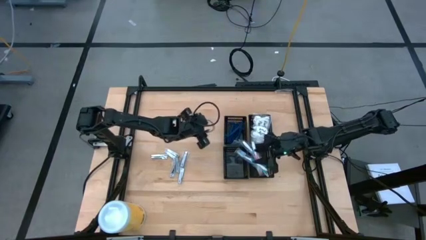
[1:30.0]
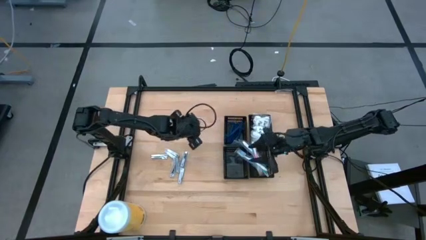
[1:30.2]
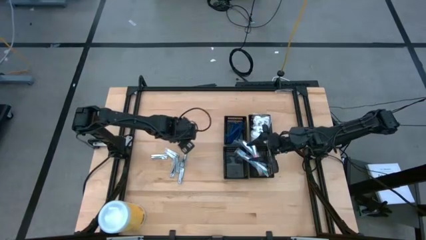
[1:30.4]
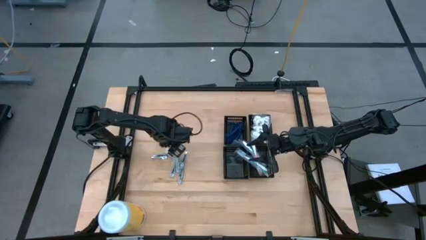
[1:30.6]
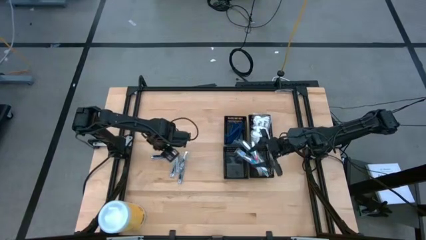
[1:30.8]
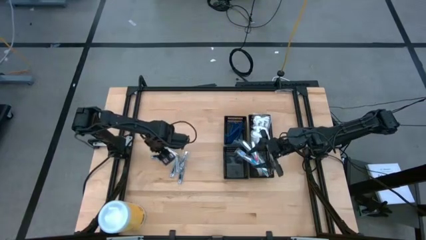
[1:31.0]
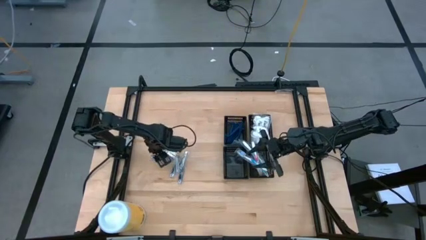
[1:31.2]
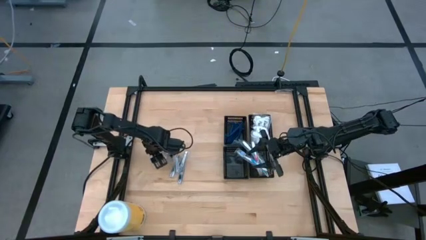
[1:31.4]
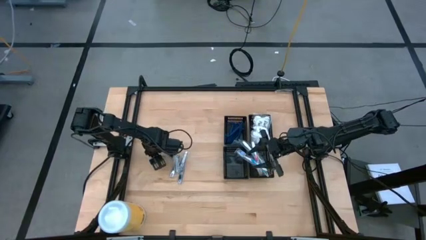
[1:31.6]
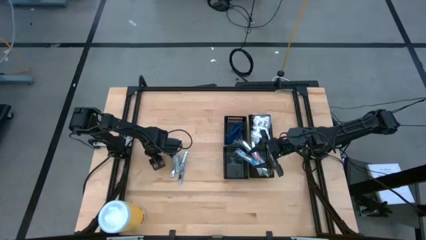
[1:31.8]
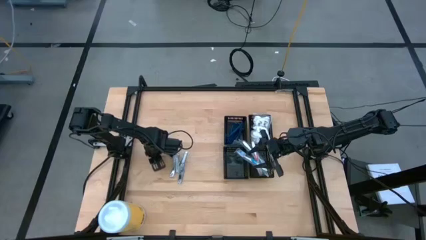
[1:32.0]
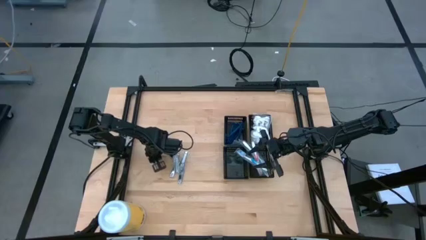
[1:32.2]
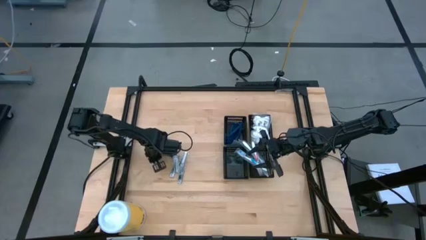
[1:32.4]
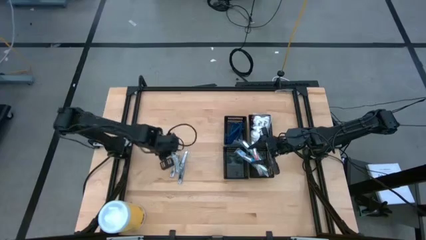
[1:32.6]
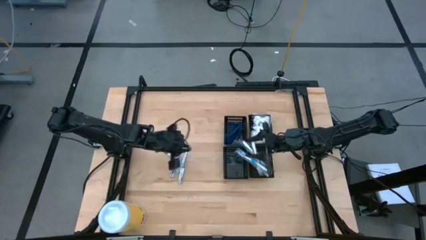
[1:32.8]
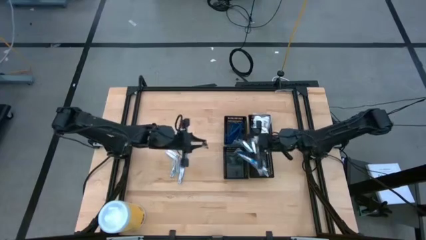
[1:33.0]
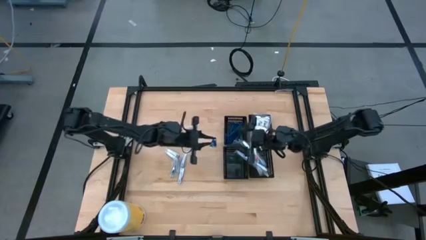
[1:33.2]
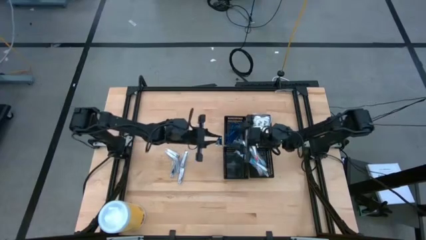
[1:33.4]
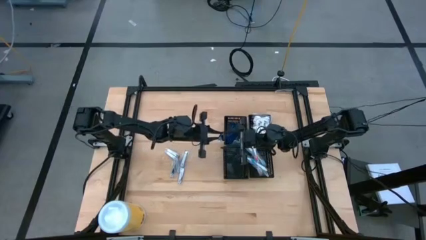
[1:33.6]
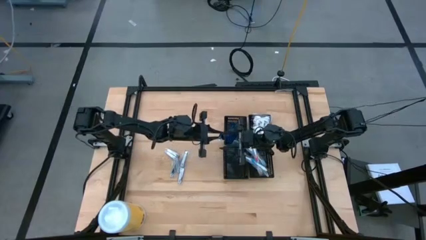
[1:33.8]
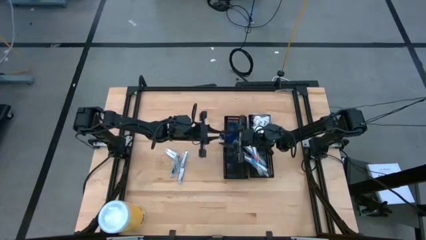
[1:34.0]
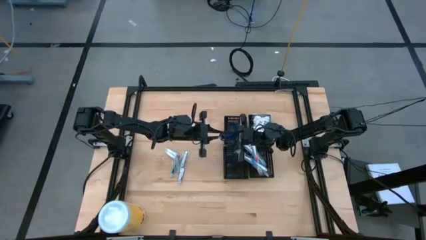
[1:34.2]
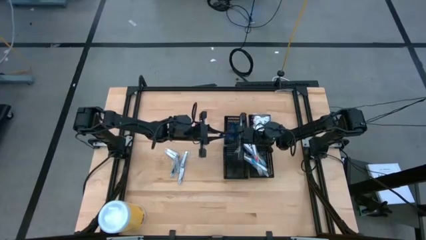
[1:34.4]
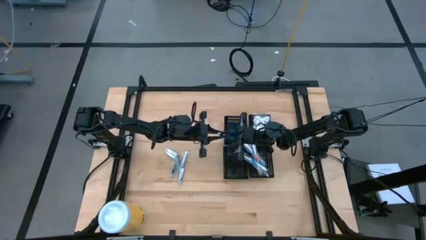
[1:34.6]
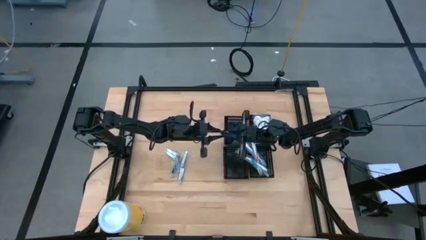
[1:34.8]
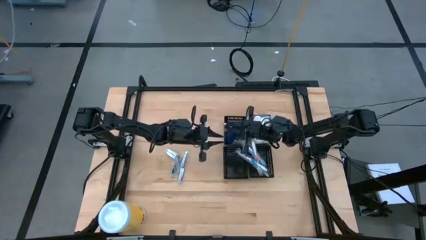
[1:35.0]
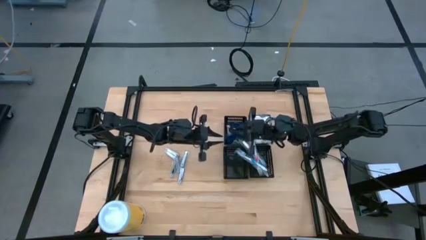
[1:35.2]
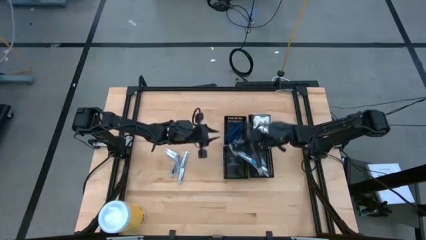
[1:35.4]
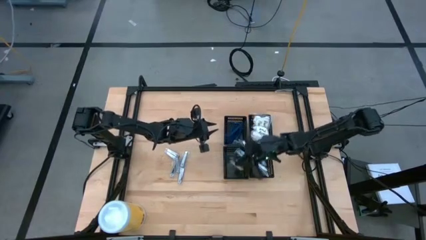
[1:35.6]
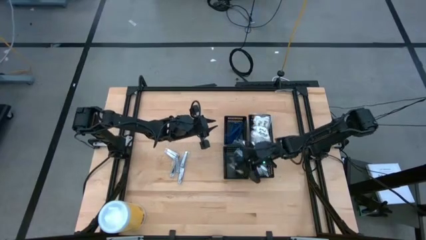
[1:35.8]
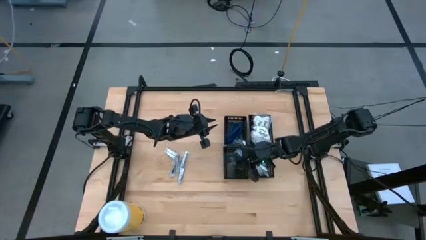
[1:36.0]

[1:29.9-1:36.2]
Task: Pick & Place Travel size toiletries
Put the nail cutter into the bottom left black basket

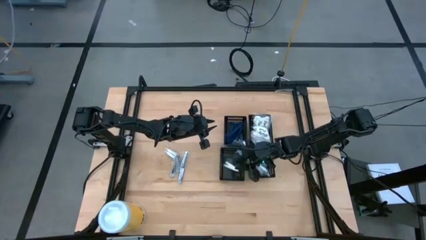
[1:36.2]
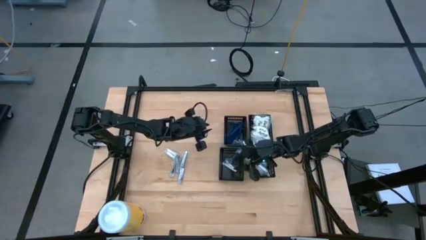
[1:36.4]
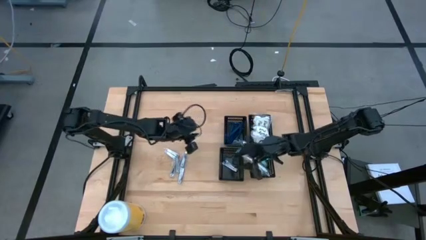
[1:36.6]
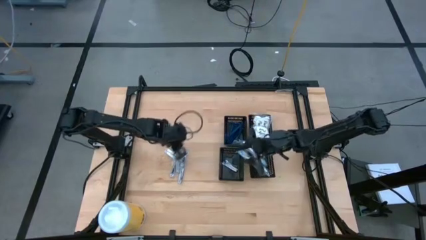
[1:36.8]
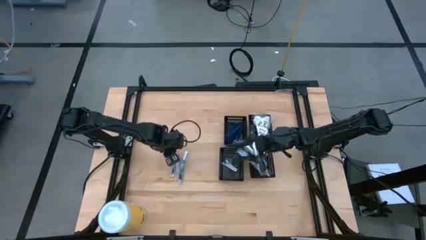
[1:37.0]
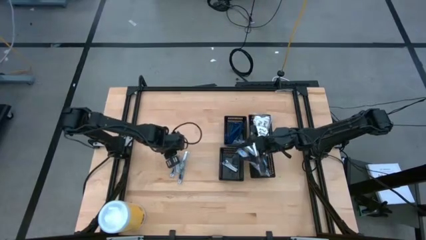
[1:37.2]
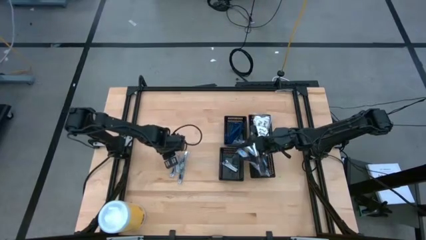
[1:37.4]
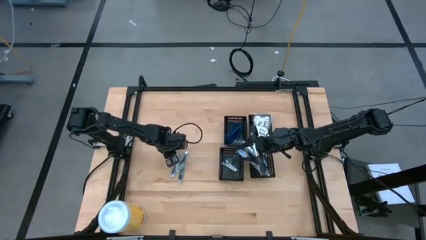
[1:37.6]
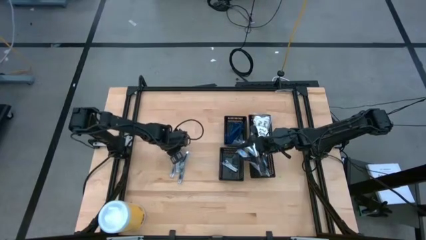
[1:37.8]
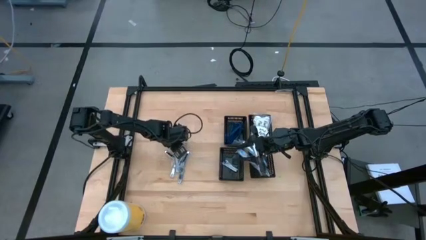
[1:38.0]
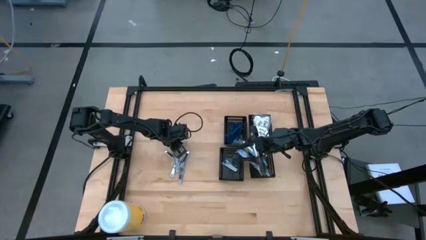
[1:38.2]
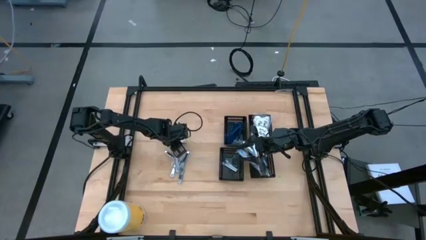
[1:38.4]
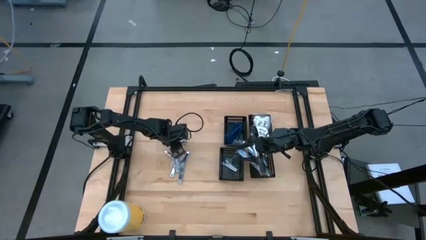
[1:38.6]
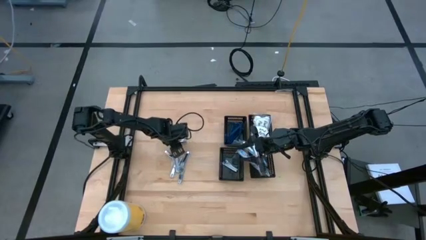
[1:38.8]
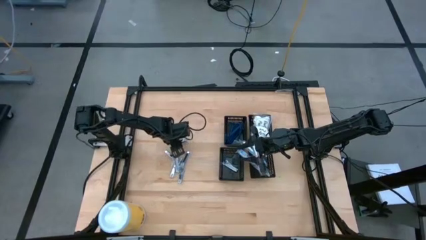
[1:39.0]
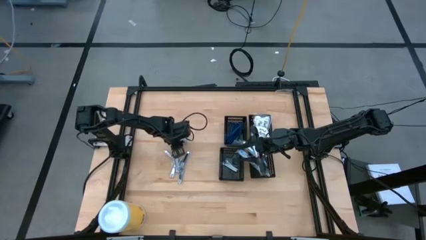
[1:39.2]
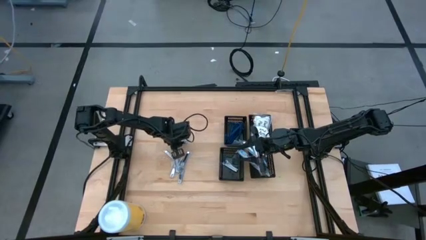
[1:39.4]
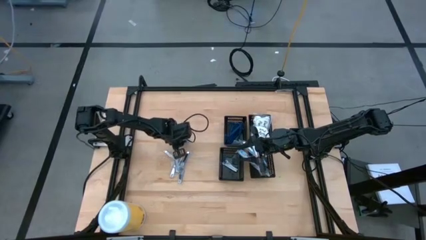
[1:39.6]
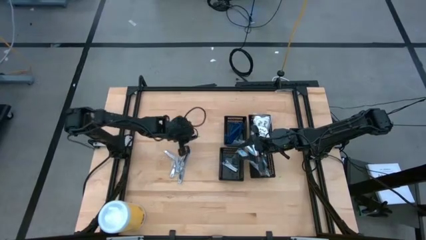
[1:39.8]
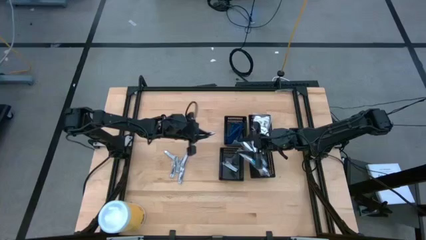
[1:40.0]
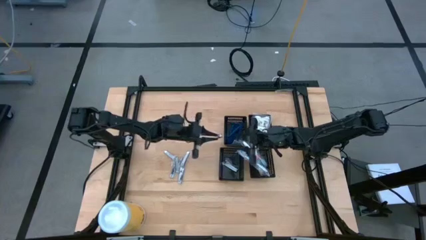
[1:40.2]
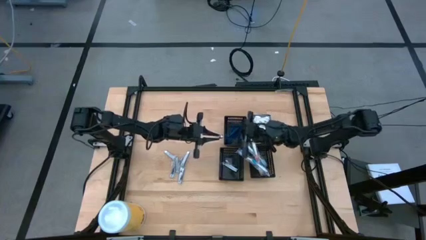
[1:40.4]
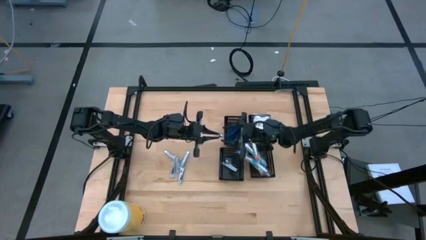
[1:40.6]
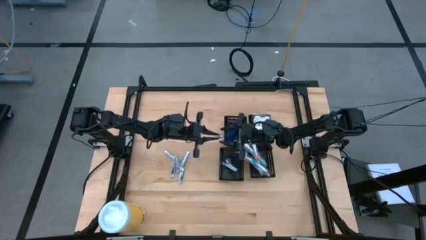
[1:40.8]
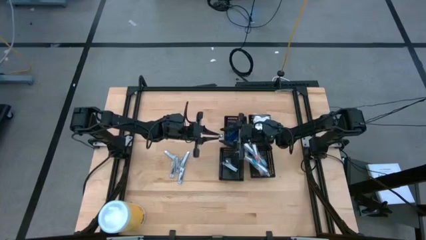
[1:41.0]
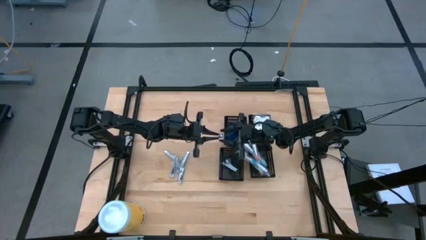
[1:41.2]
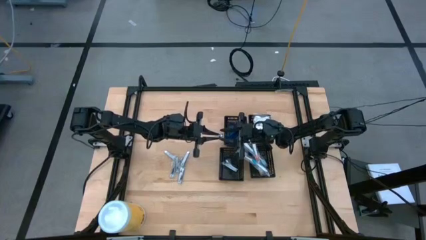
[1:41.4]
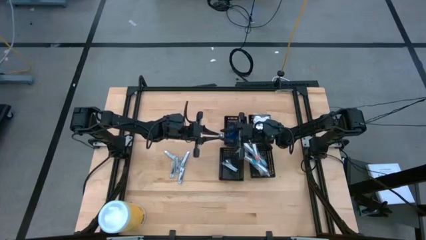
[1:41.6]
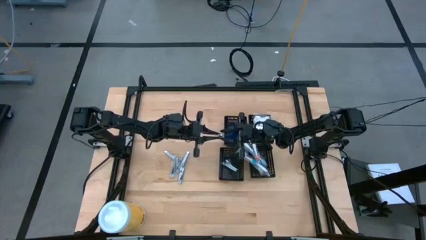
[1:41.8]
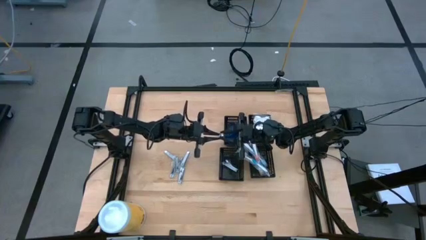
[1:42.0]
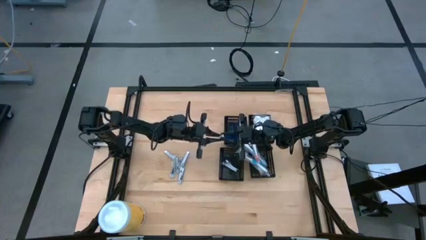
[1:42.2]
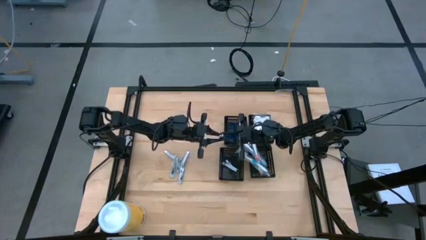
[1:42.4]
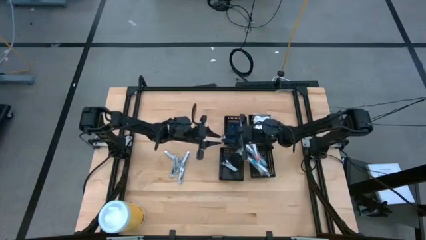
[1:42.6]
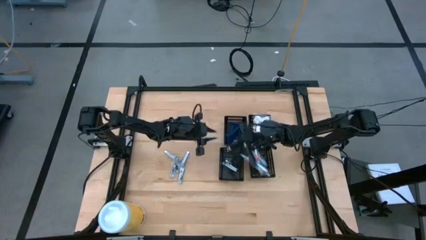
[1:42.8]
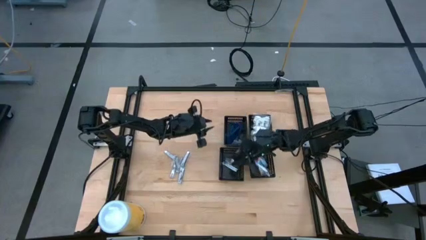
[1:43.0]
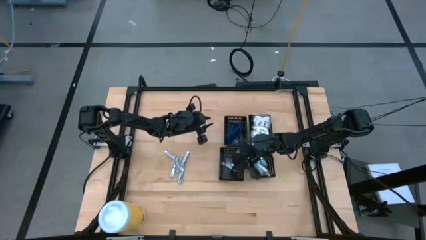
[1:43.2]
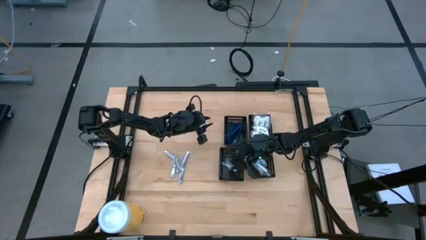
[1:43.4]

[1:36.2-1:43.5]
Put the nail cutter into the bottom left black basket

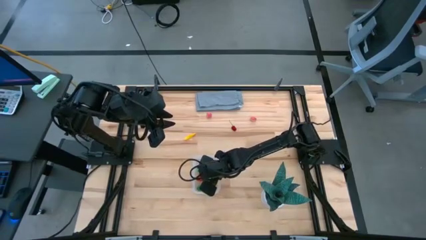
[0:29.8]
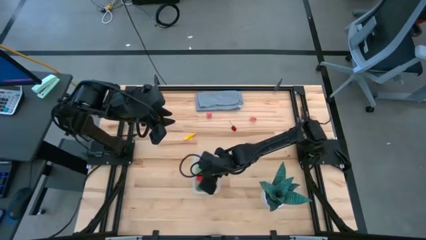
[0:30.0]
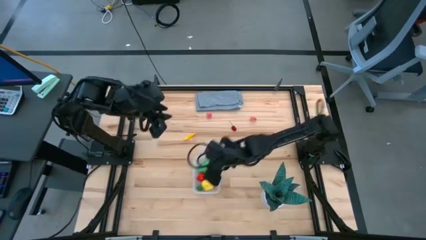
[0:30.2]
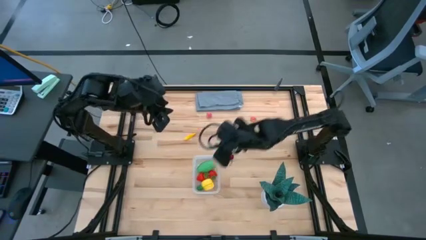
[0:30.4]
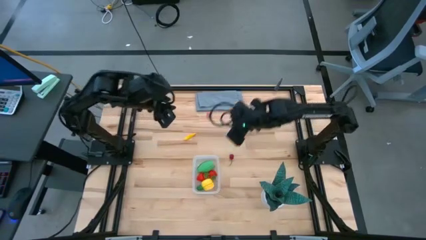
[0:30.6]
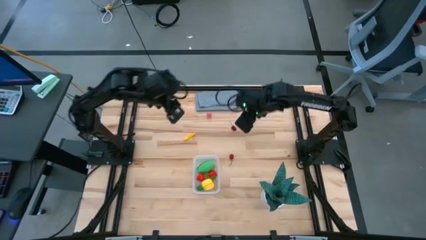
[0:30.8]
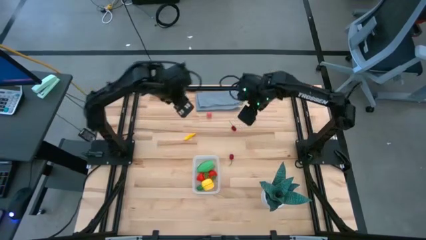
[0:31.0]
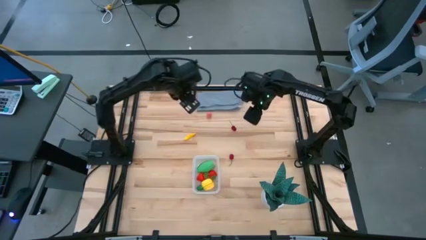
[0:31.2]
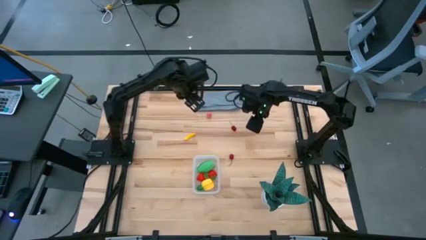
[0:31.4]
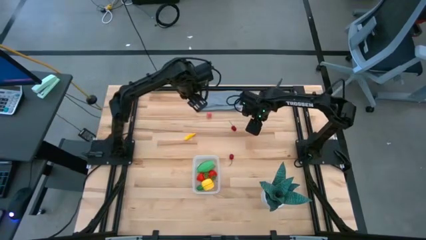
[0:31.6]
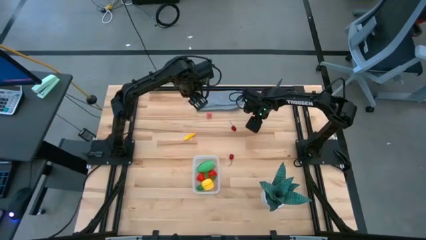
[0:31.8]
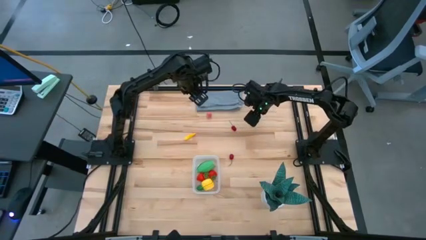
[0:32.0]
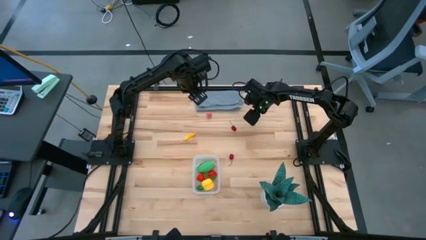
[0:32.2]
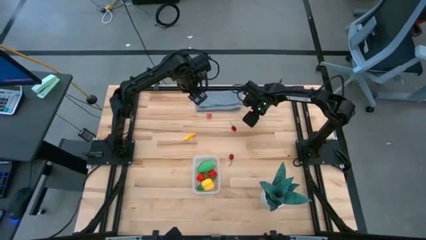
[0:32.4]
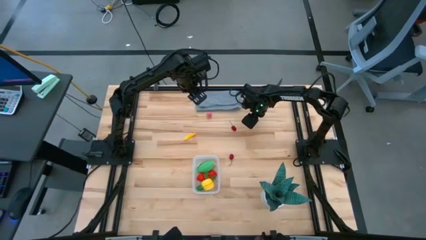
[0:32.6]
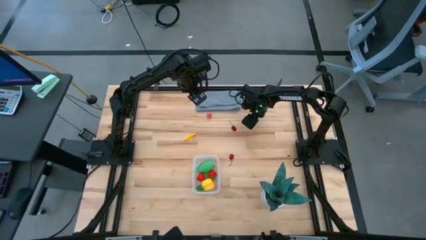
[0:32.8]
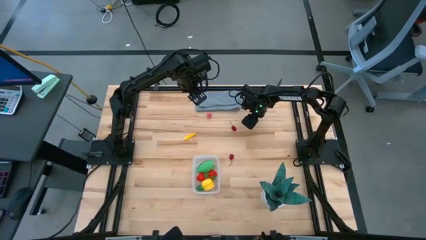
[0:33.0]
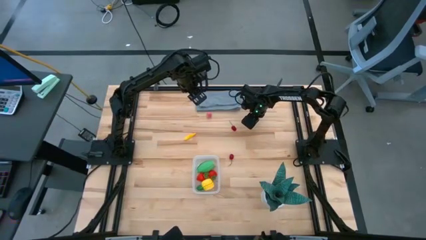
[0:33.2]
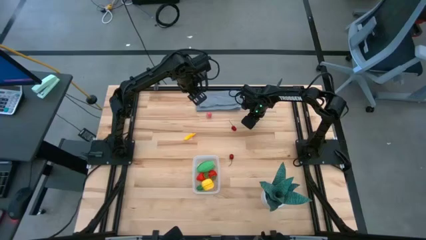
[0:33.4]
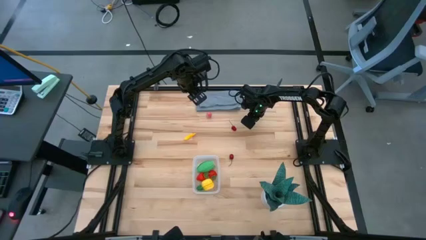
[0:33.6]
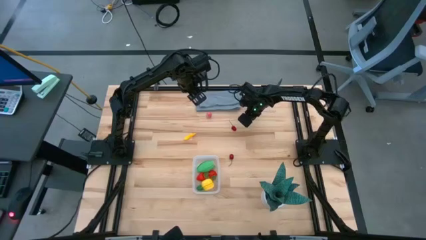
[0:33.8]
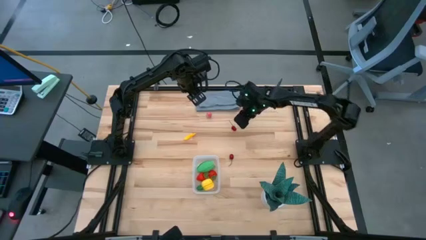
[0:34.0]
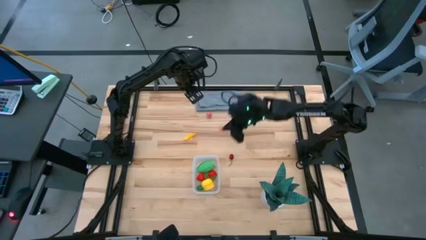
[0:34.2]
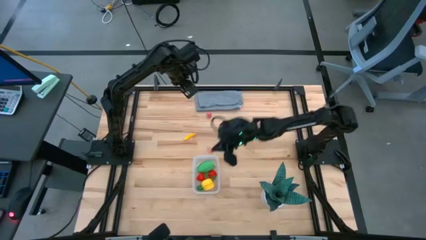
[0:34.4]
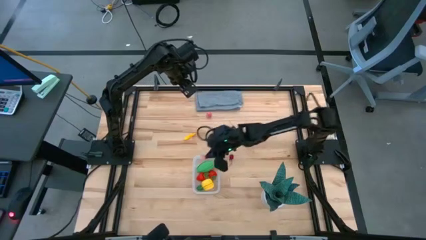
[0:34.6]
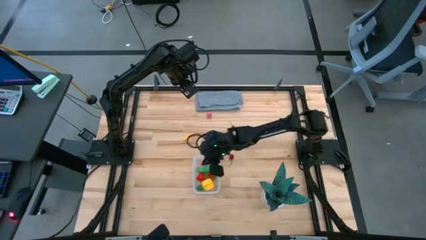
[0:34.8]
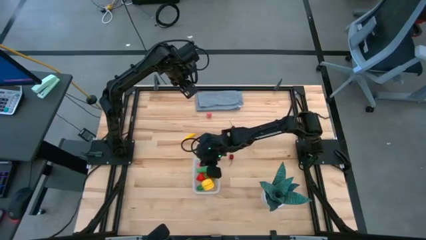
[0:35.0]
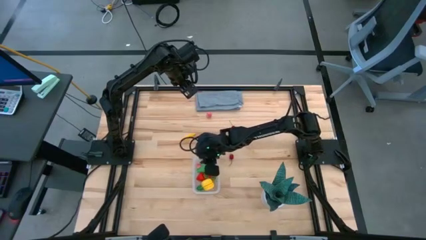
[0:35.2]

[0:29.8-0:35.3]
Task: Pick and placing Produce into tupperware
Put the right peach into the transparent bin
